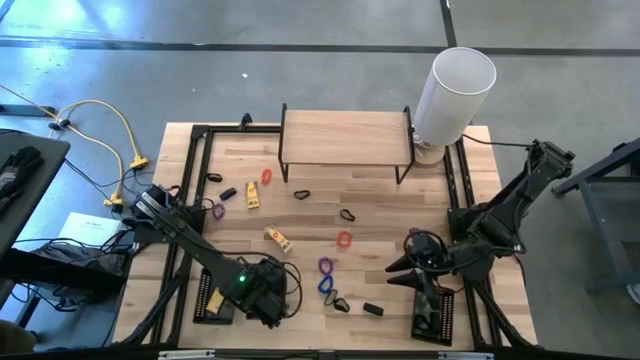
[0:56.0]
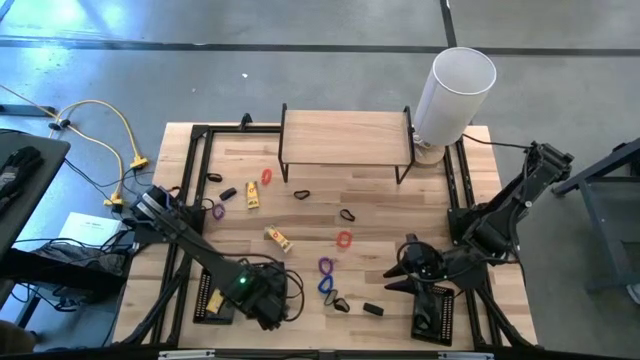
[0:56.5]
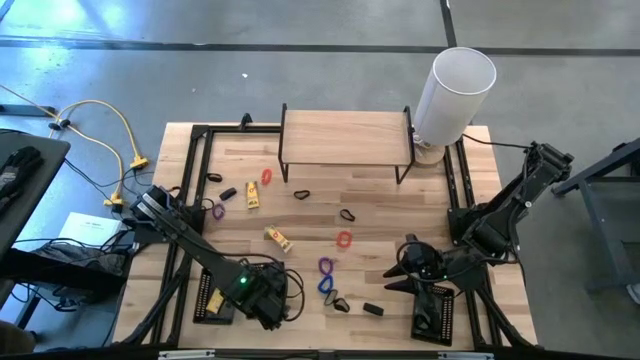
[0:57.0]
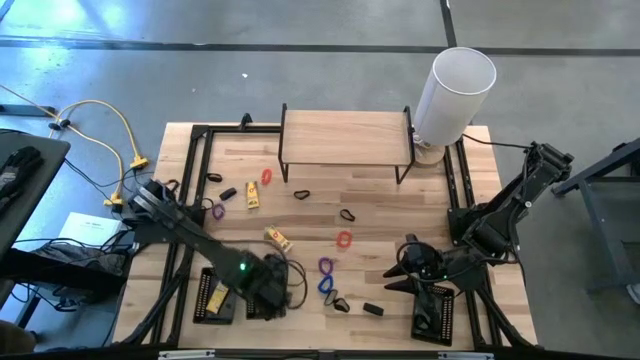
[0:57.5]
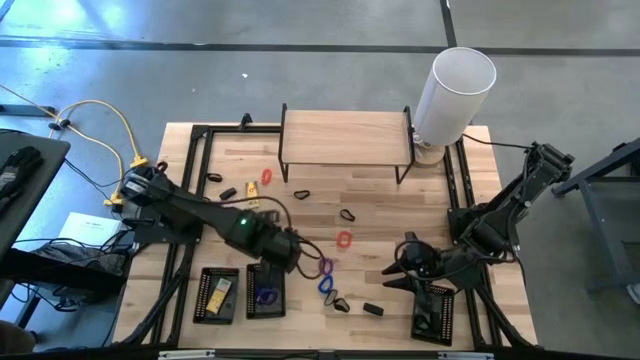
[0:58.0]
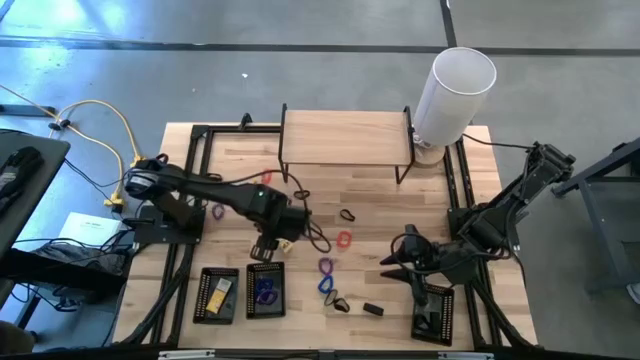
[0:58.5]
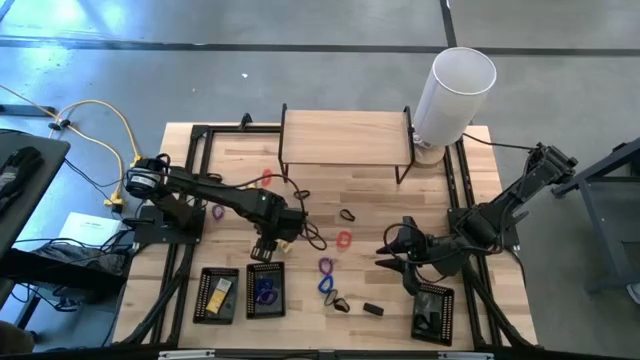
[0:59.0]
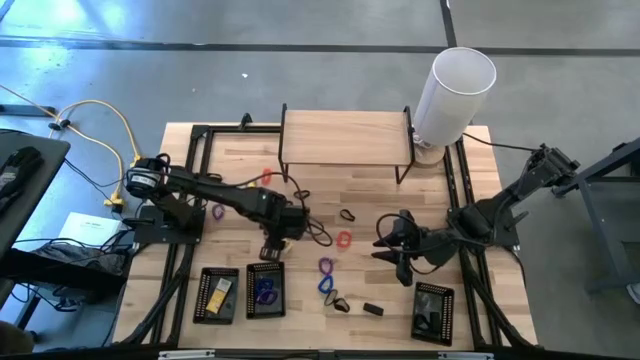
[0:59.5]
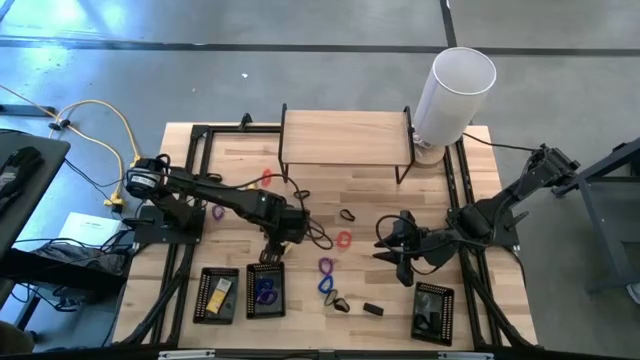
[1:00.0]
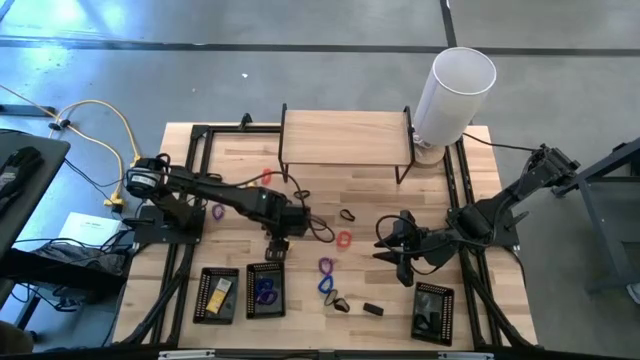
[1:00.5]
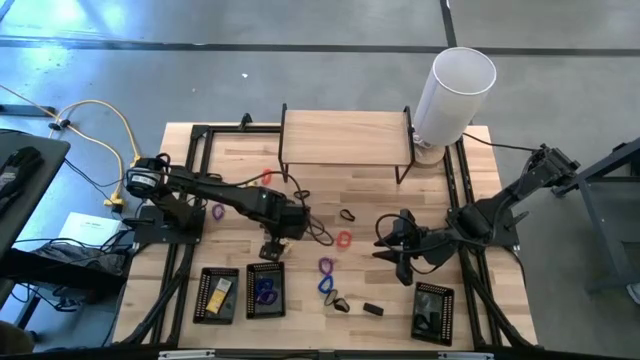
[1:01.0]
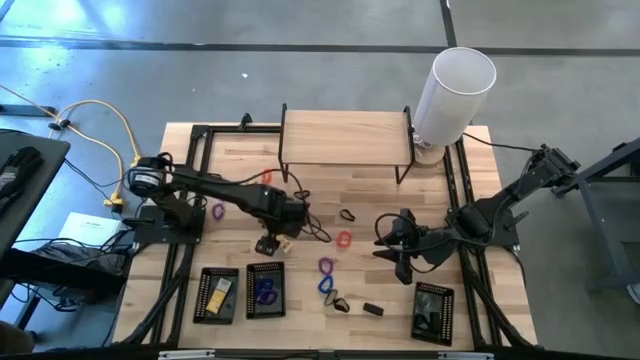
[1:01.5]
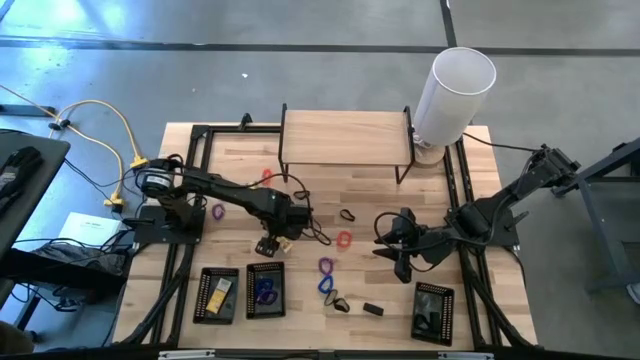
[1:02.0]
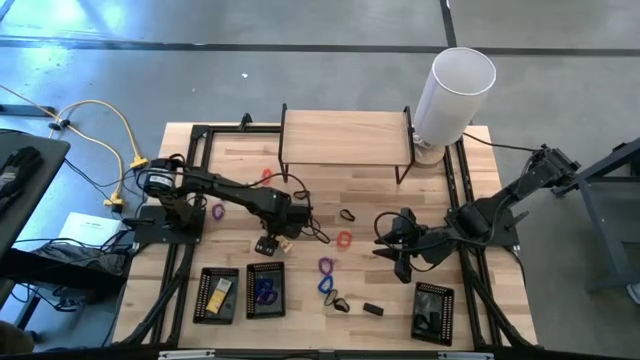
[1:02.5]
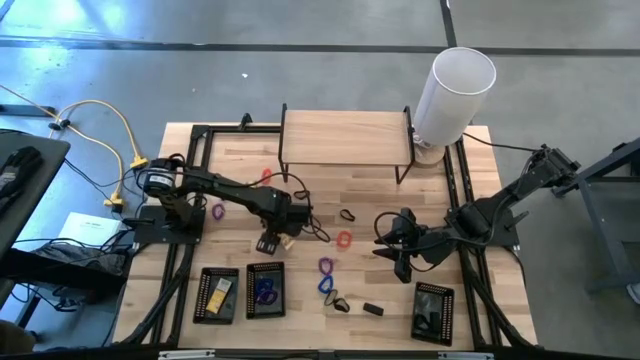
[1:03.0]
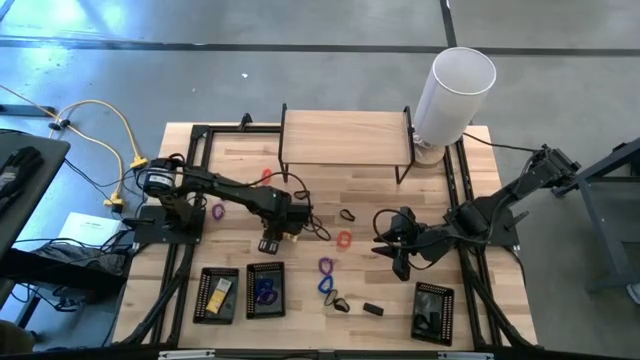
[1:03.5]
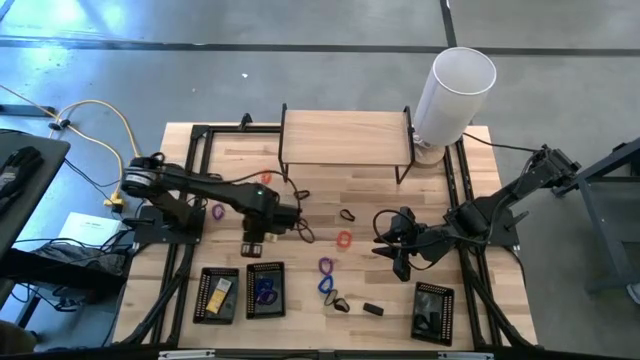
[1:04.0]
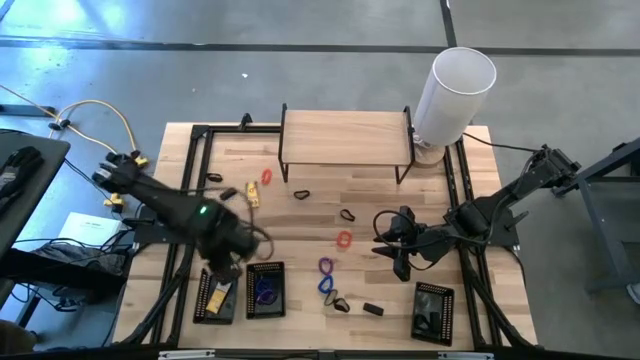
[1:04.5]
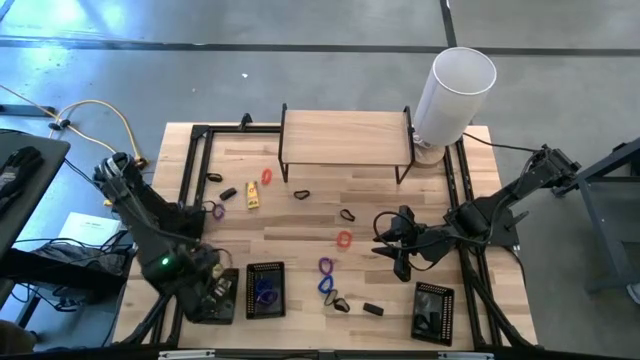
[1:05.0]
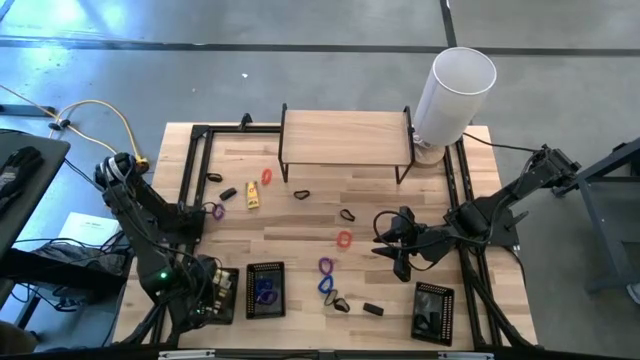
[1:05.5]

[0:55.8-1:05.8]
Task: Pick & Place Office Desk Supplies
Put the crayon box into the left black basket

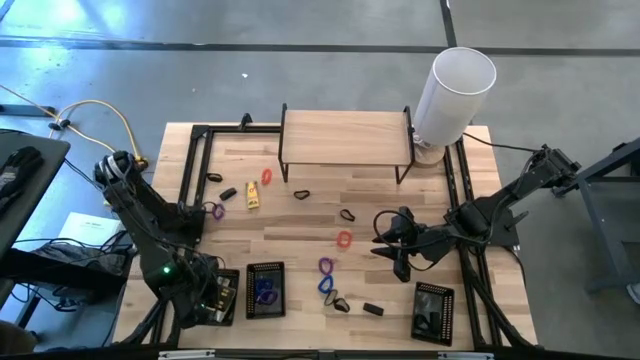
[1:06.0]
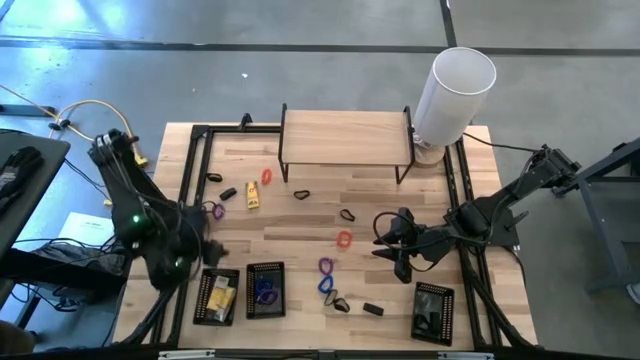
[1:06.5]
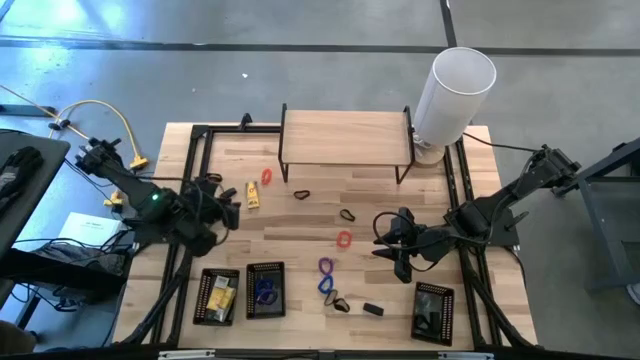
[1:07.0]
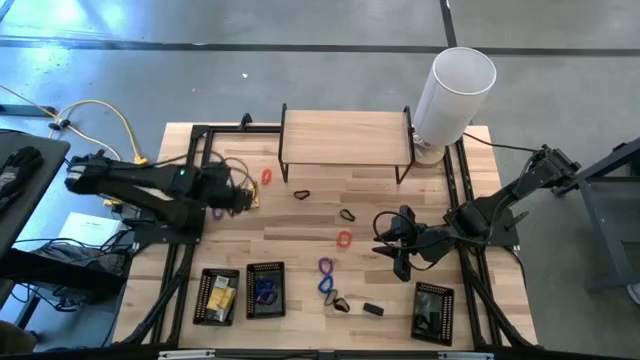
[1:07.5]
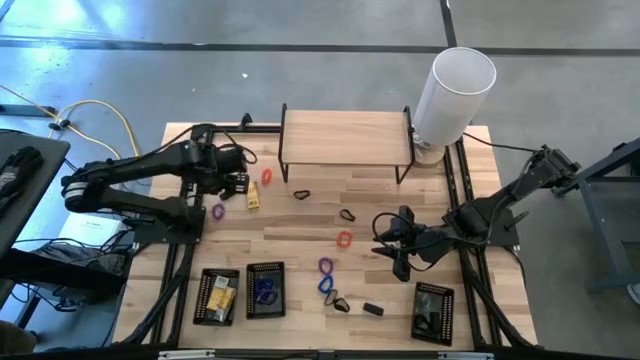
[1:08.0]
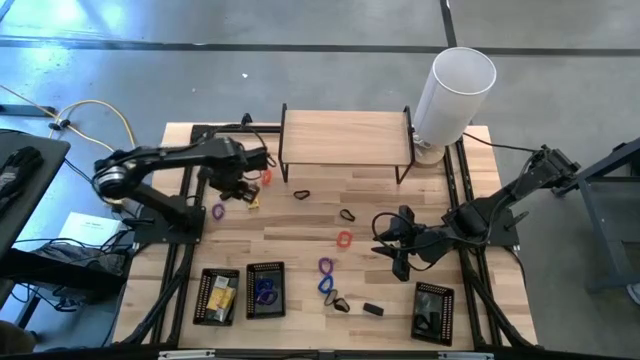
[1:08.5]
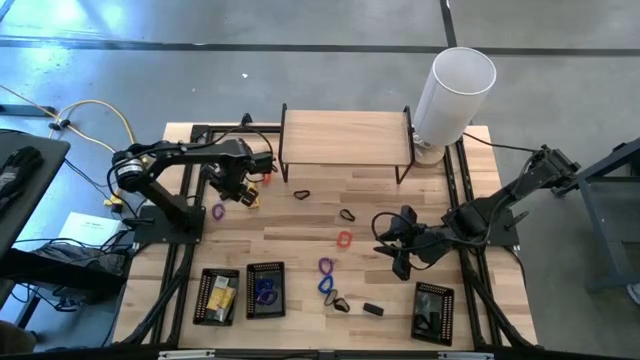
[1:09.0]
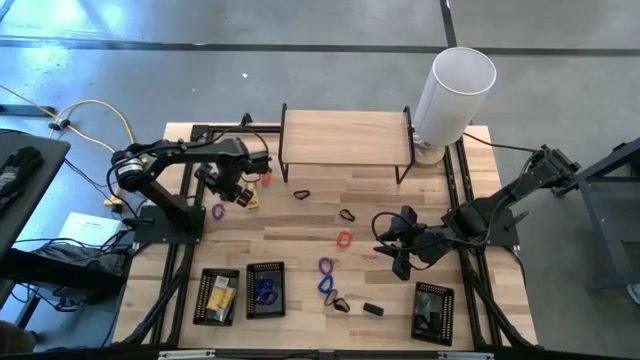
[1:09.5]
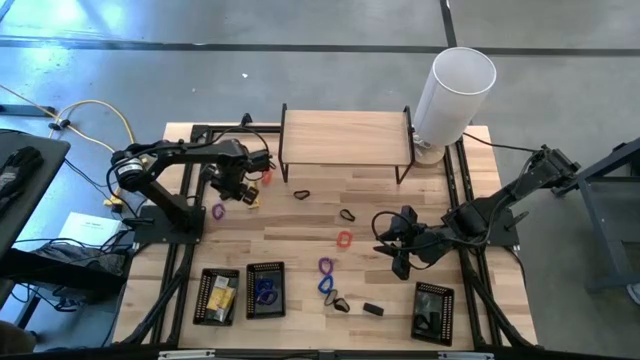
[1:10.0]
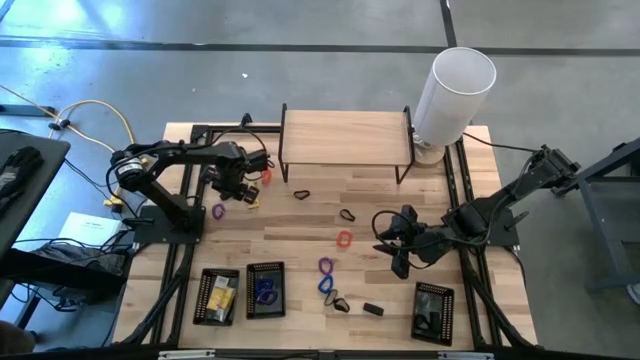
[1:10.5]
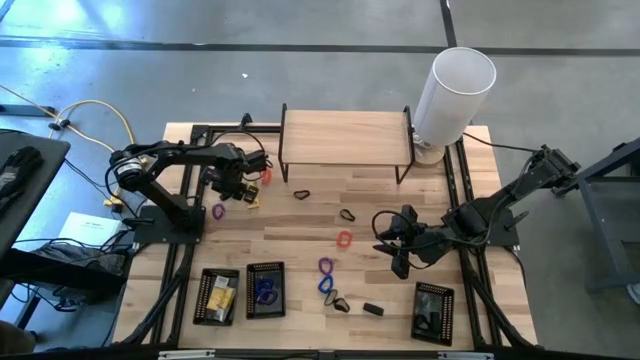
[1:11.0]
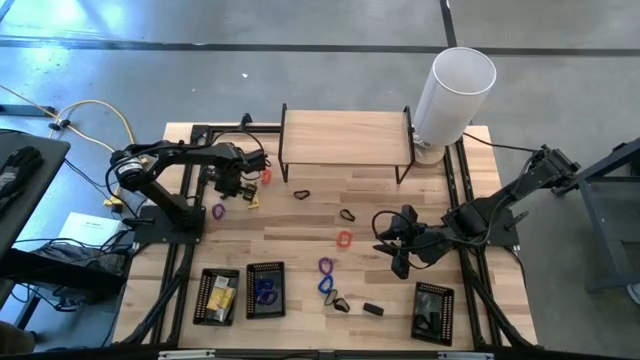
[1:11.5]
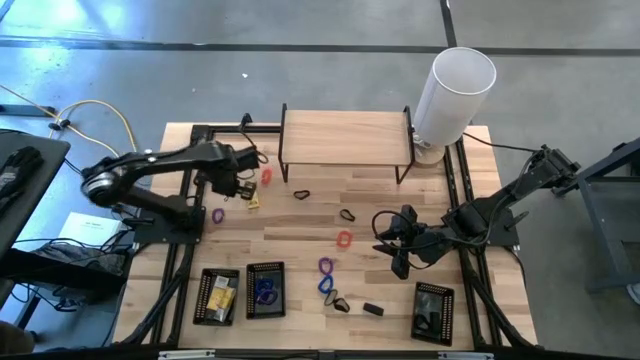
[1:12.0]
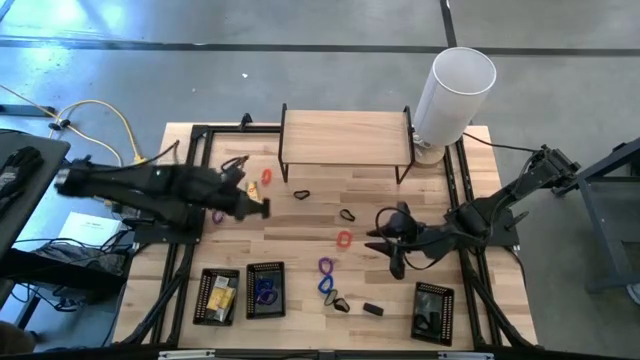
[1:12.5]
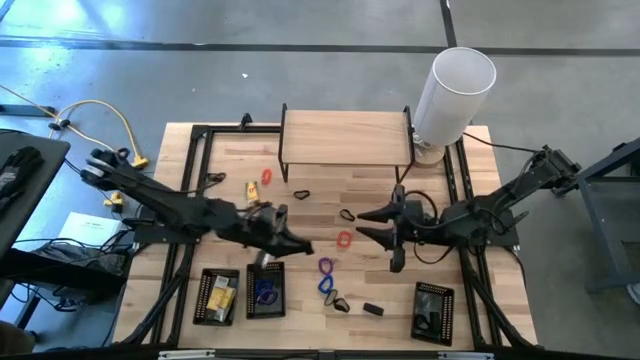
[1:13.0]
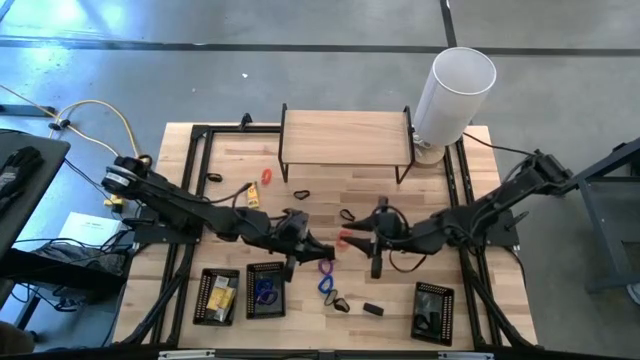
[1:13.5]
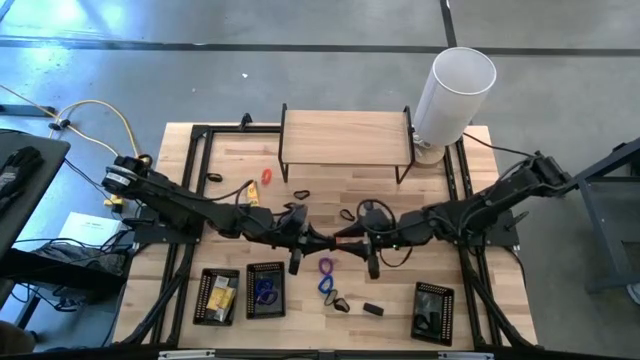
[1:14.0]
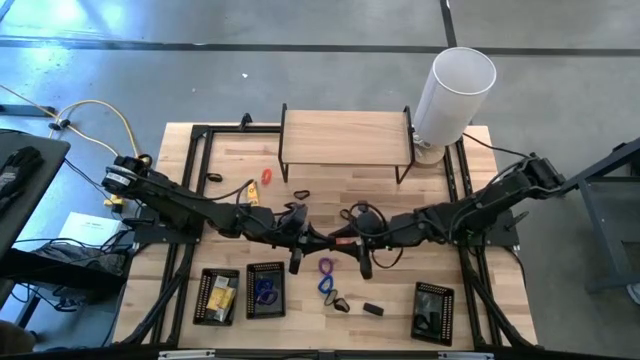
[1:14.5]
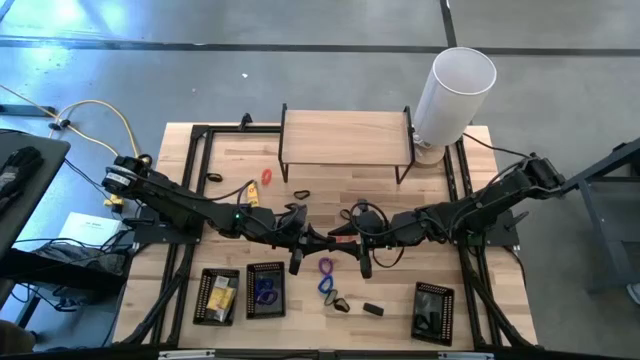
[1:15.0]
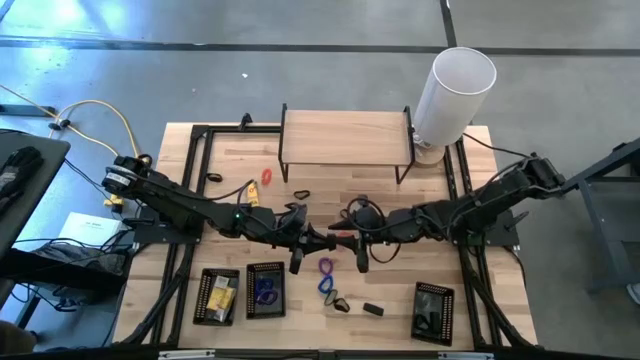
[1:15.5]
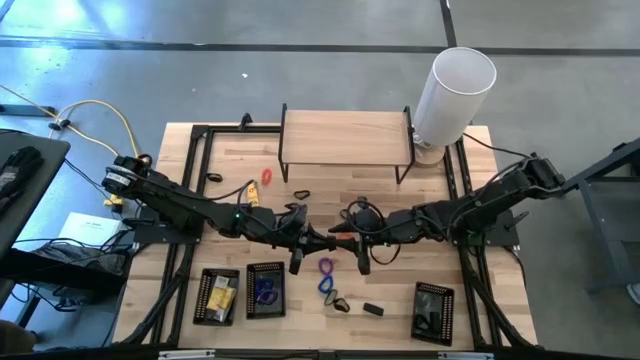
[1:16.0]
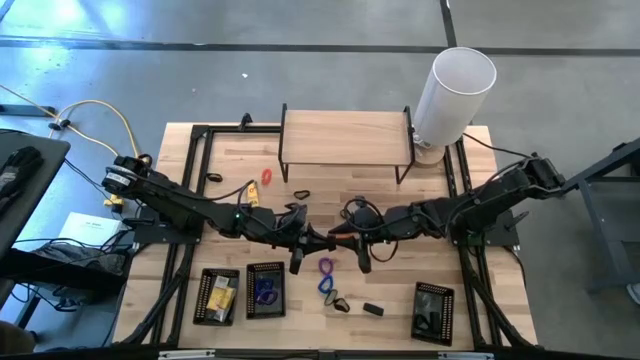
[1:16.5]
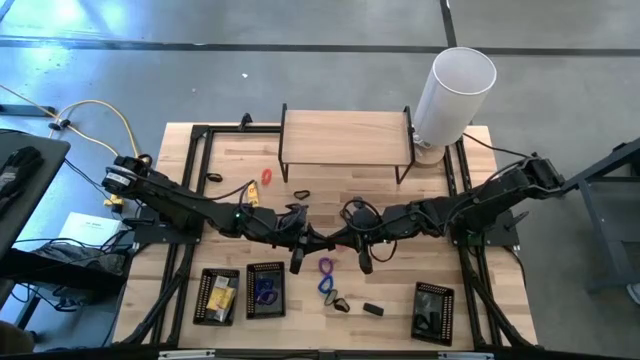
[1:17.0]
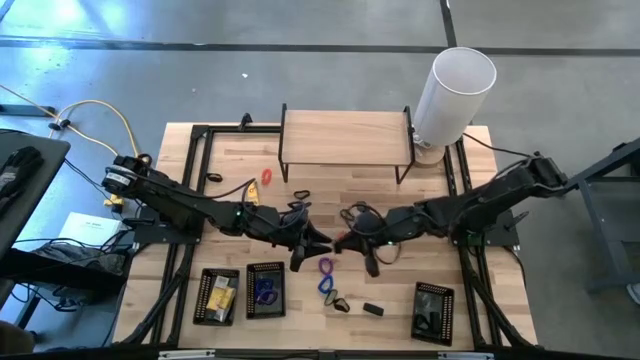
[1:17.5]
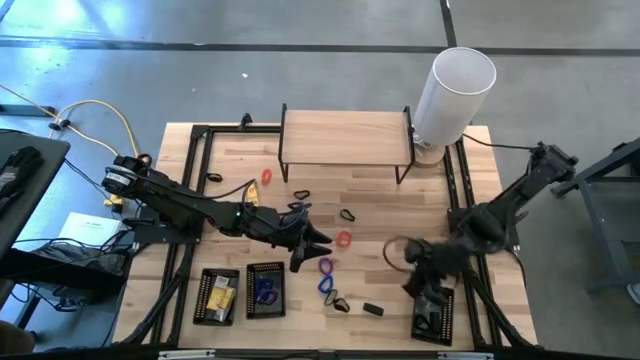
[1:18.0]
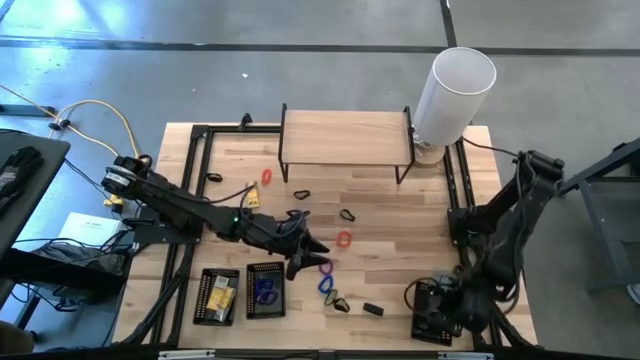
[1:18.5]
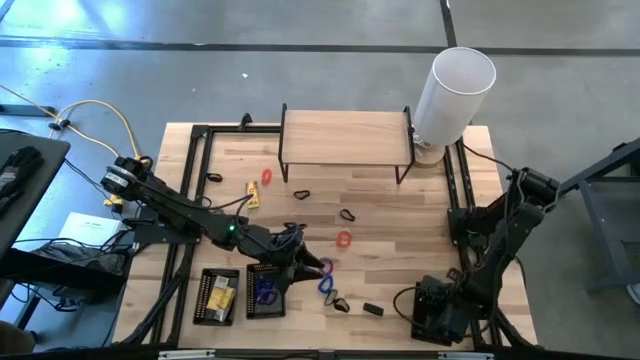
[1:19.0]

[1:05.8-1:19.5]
Put the black rubber band into the right black basket
